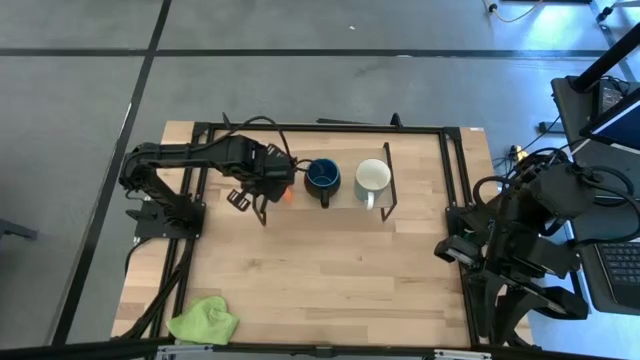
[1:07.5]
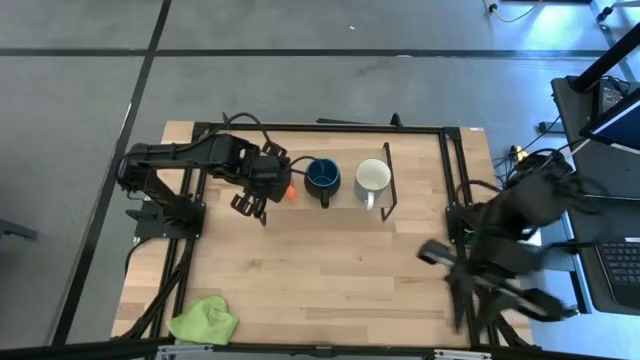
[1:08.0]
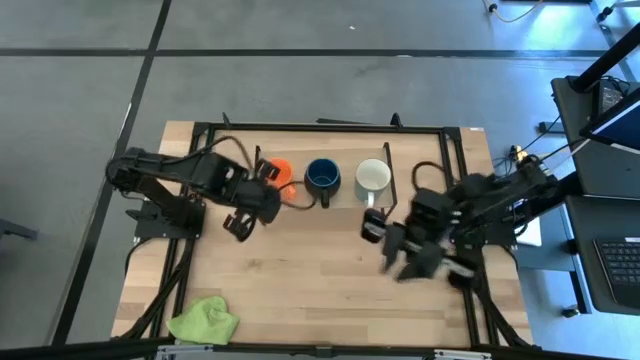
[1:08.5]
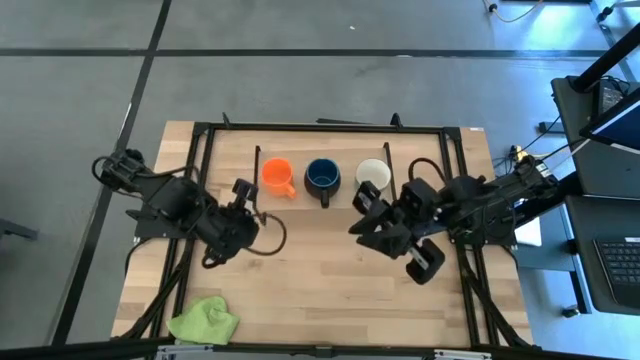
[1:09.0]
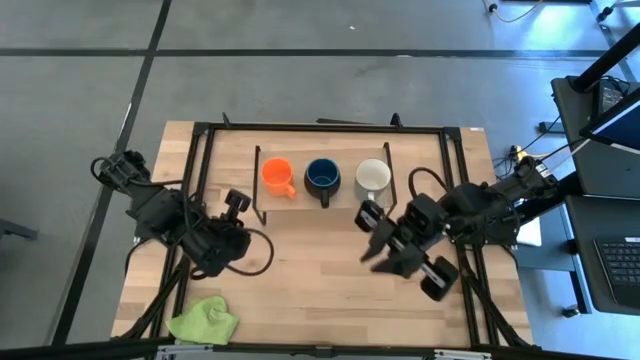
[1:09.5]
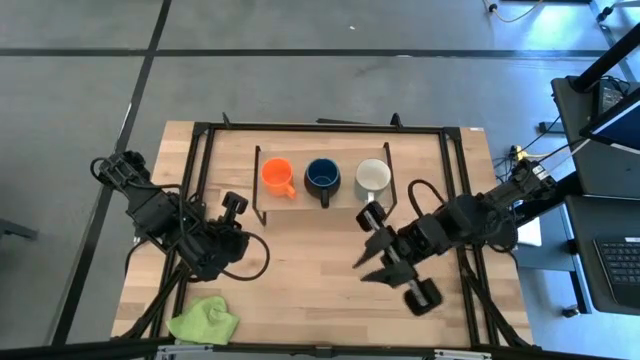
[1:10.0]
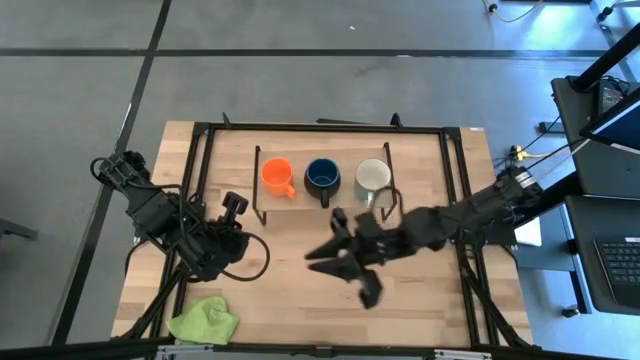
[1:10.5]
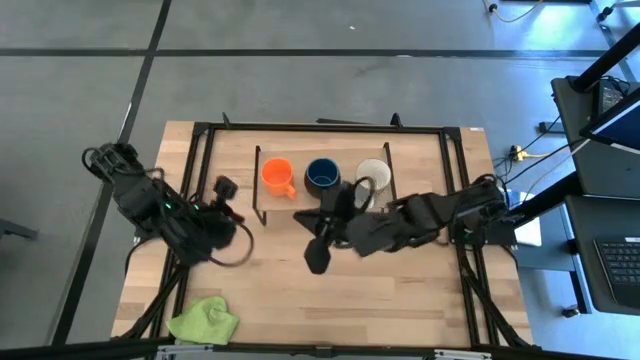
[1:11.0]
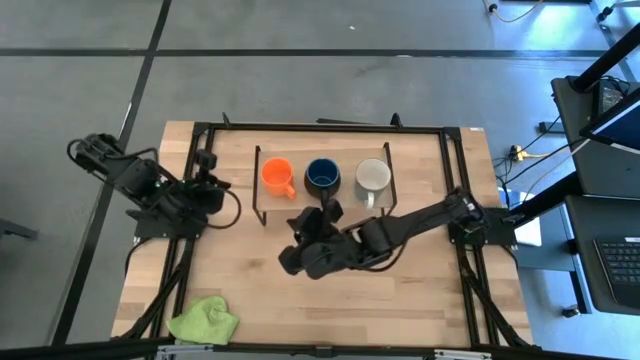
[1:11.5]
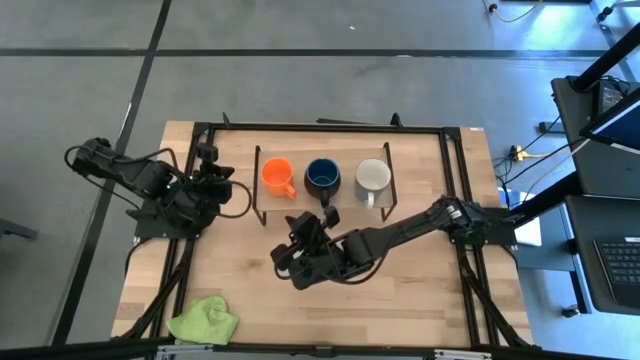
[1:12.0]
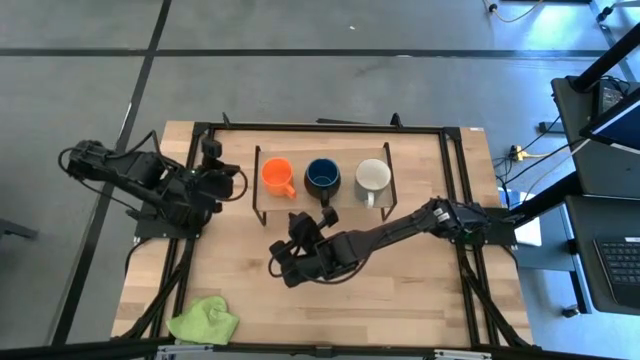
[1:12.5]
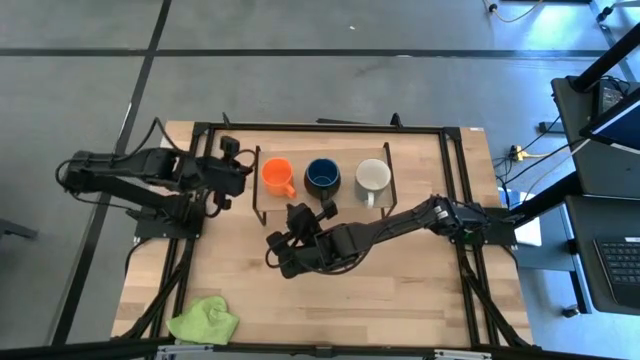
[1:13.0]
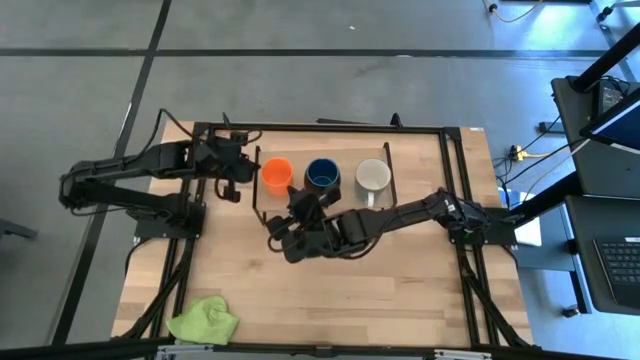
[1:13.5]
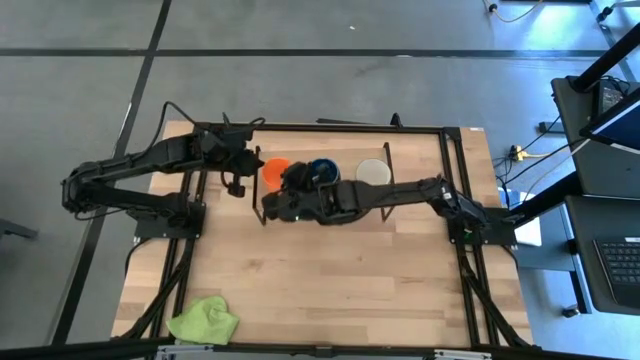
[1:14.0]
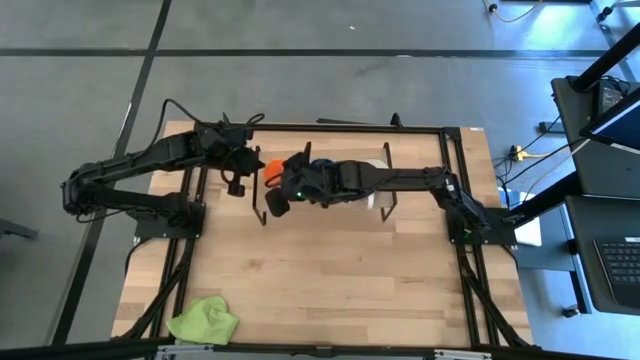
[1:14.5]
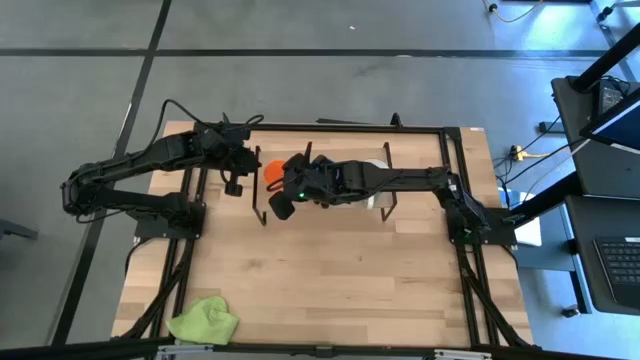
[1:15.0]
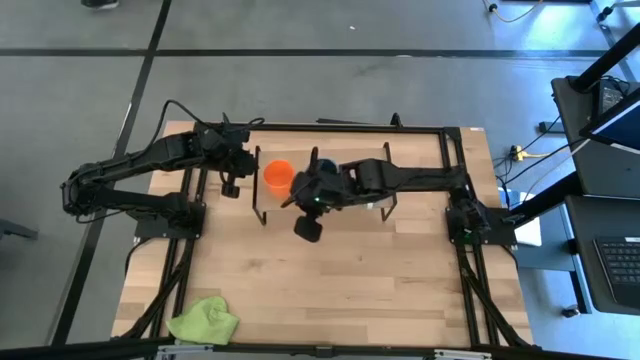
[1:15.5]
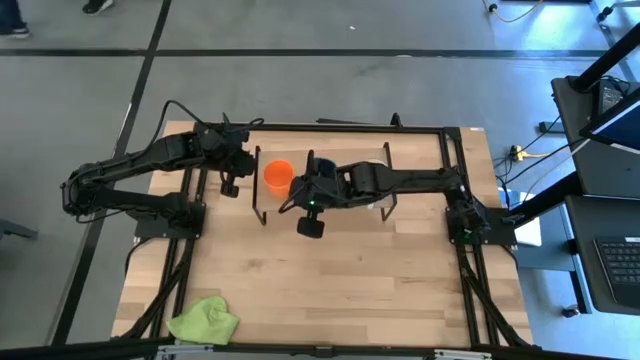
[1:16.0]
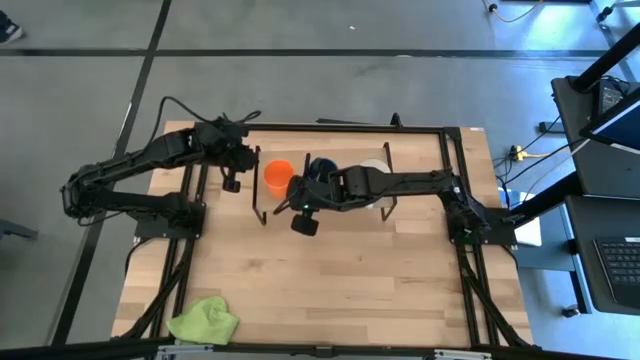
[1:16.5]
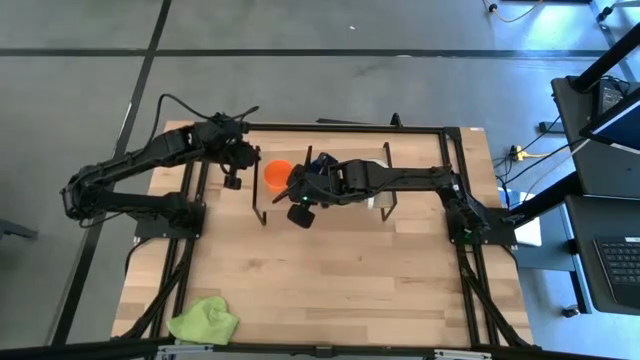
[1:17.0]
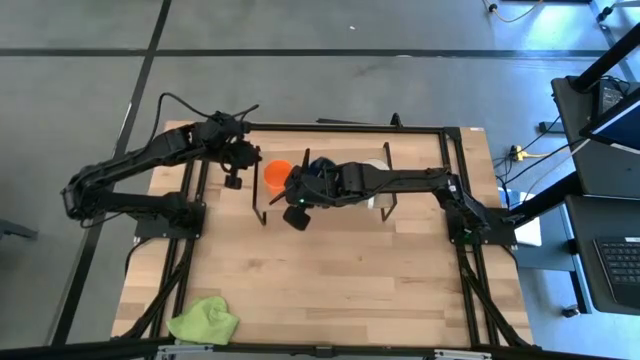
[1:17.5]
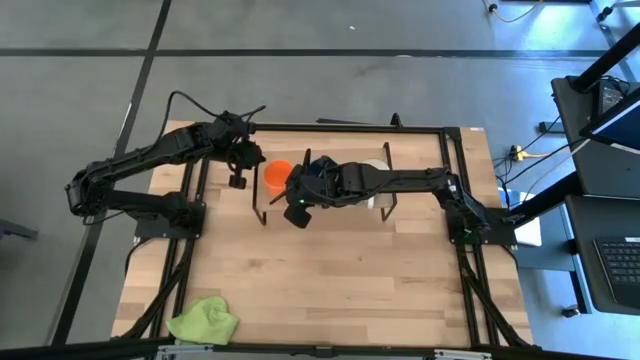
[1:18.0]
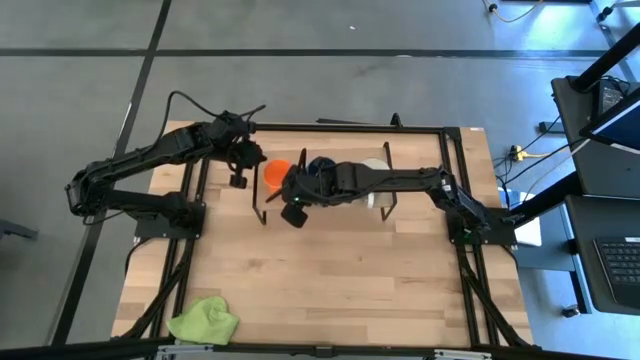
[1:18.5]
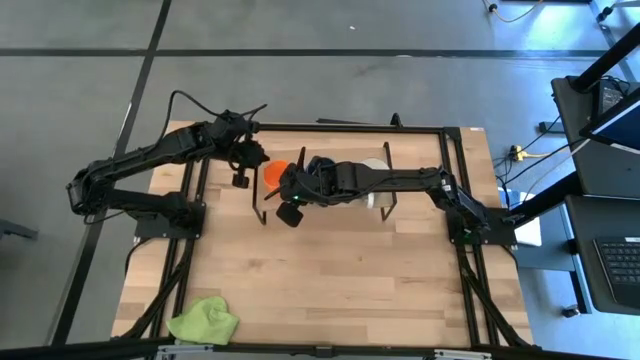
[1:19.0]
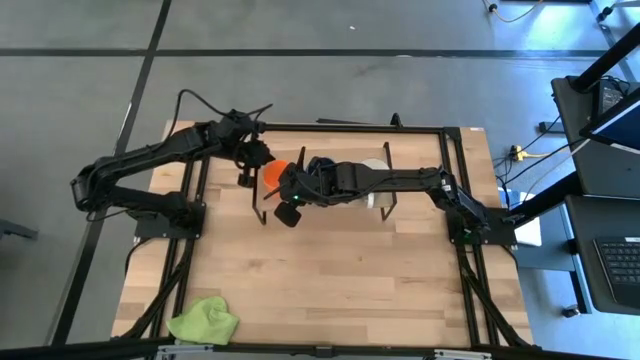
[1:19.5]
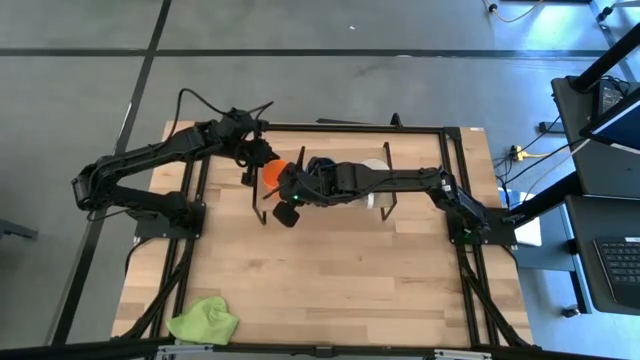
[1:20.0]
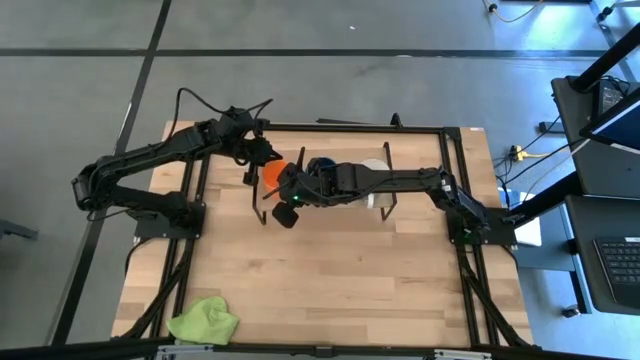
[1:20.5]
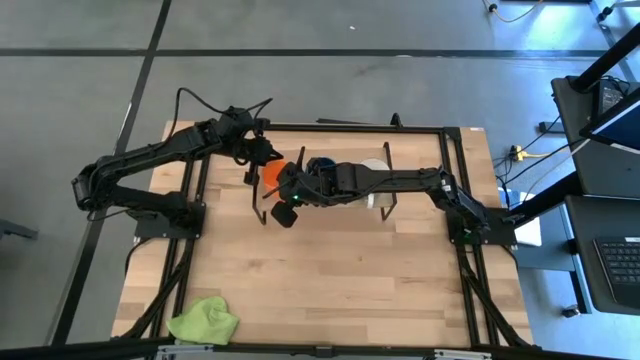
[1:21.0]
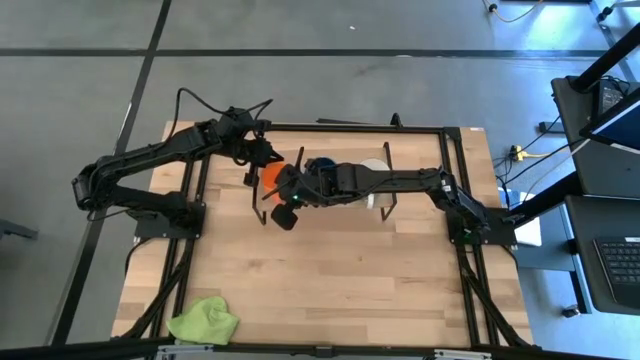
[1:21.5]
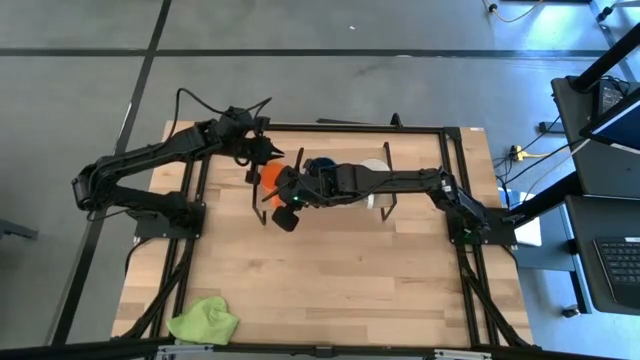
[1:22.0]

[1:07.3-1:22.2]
Task: Stack small to large cups/mugs on shelf
Put the orange mug on the shelf
